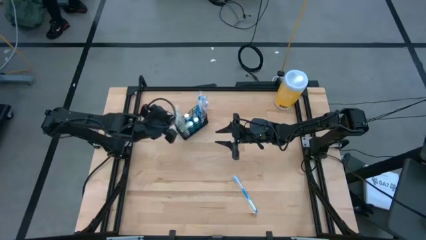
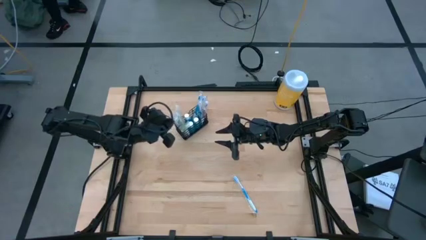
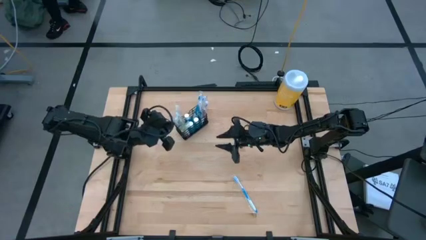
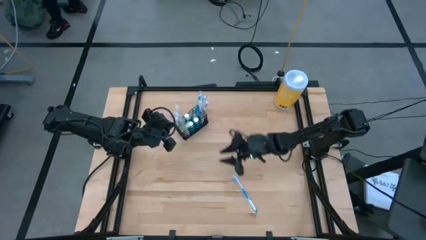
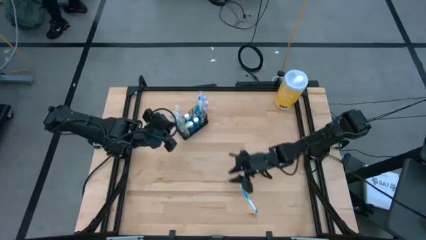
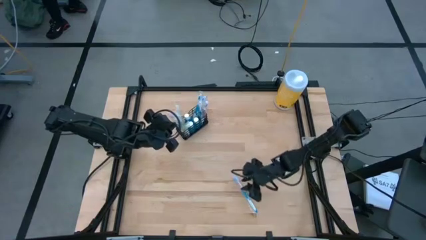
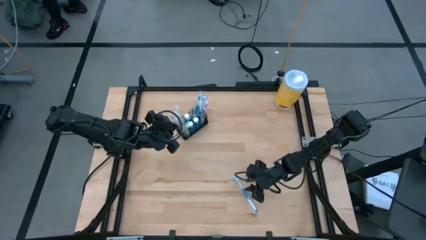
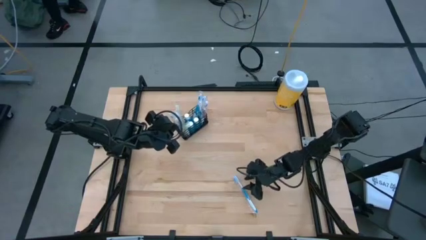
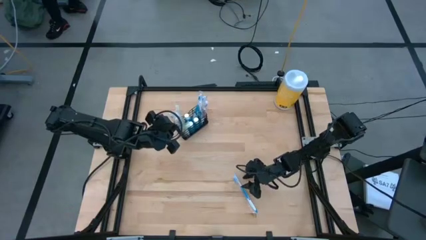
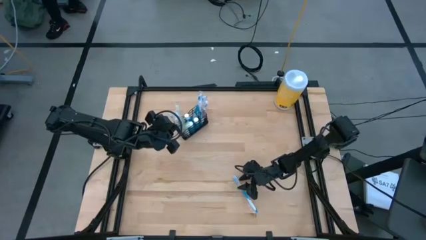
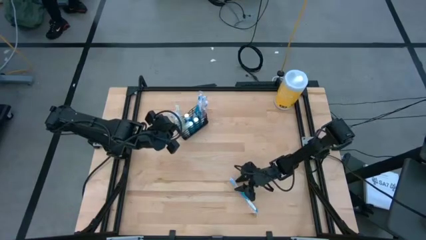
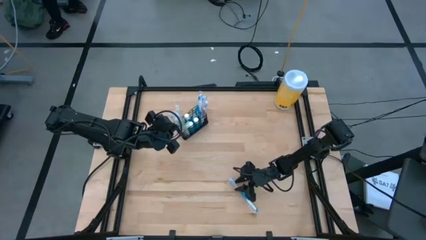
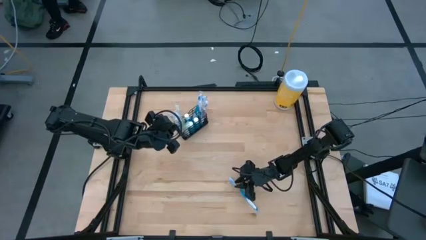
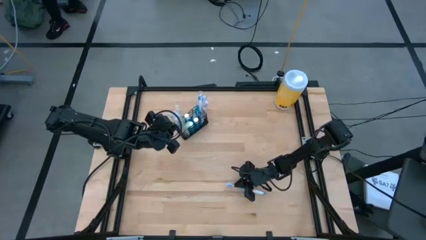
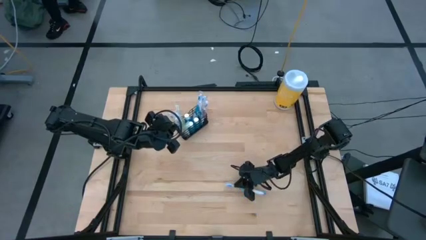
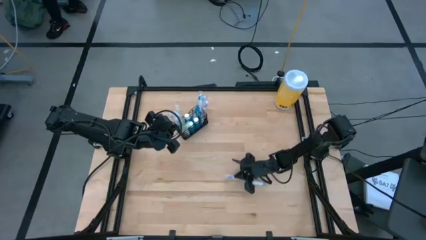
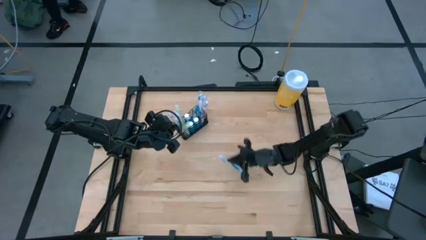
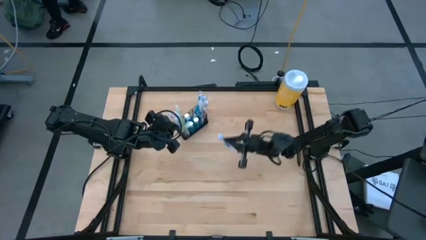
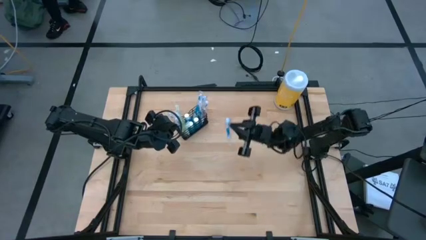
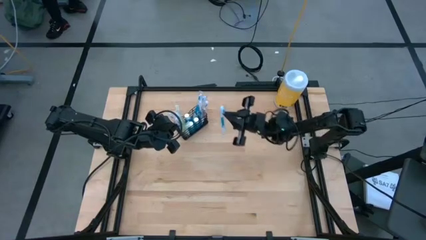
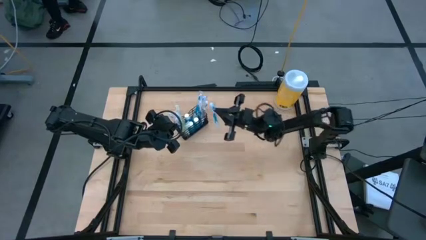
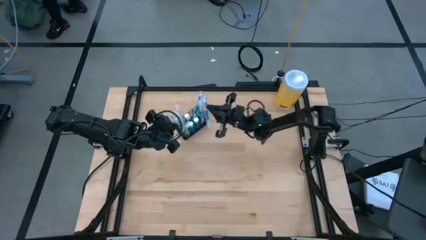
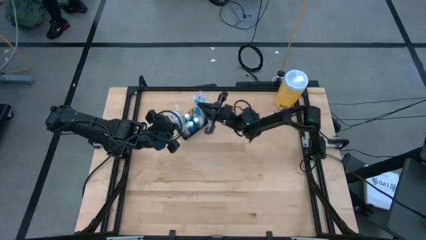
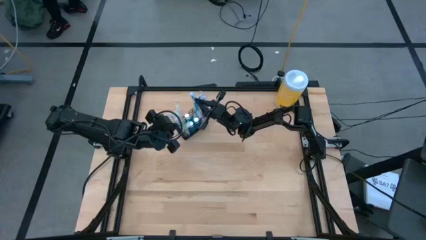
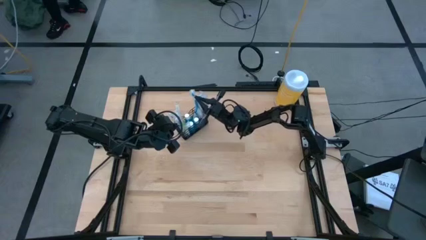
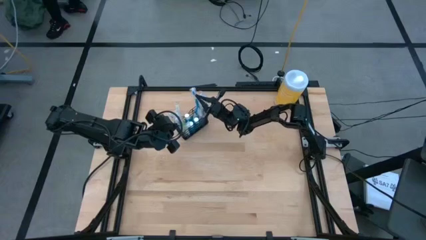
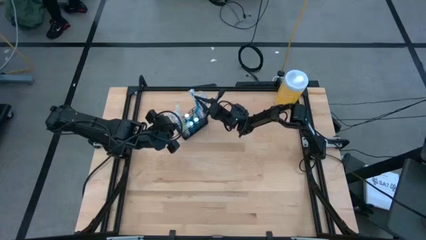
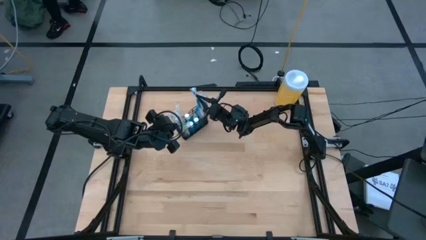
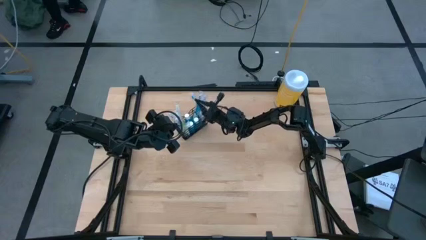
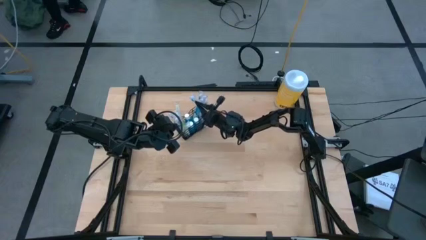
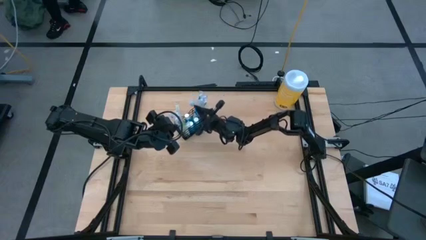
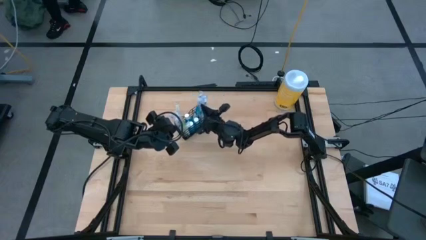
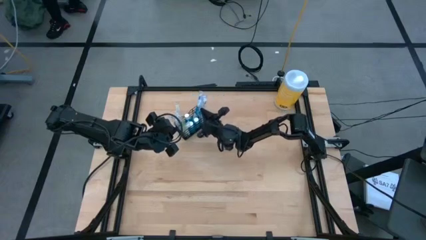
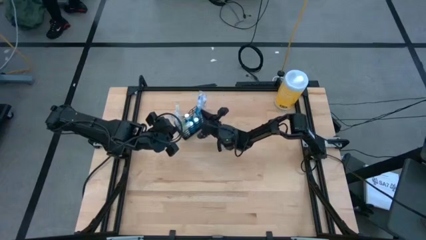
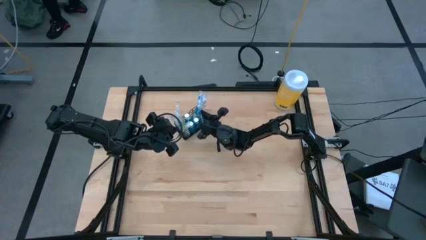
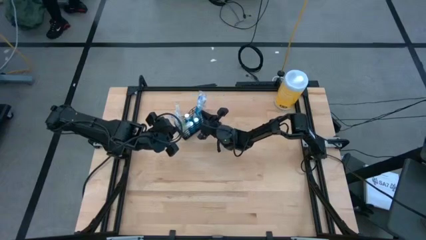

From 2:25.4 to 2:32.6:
Task: Pick & Place toothbrushing station
Put the blue toothbrush into the black wire organizer

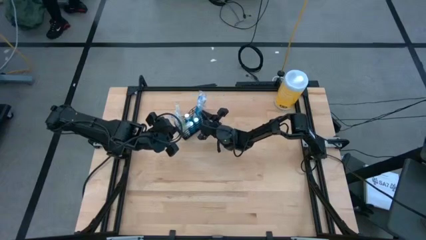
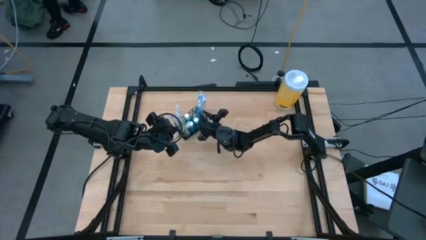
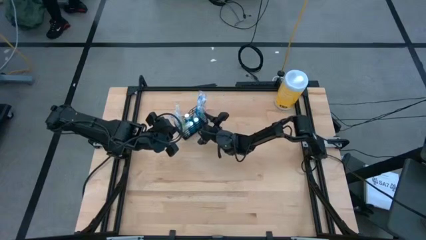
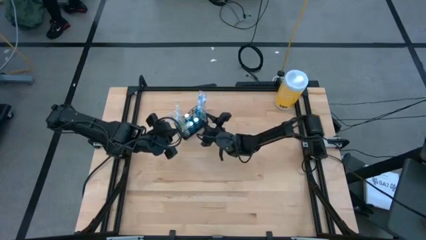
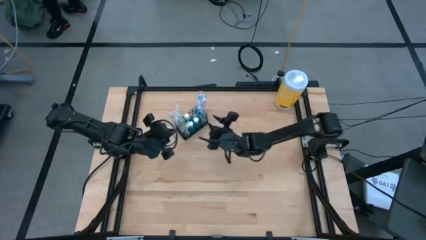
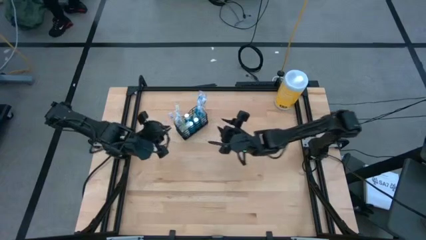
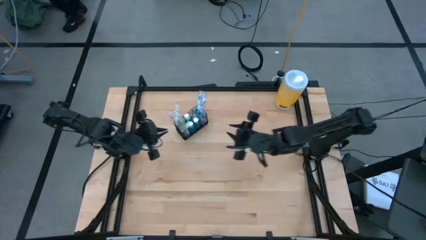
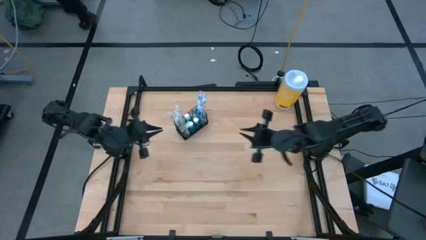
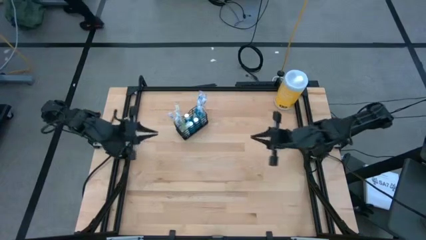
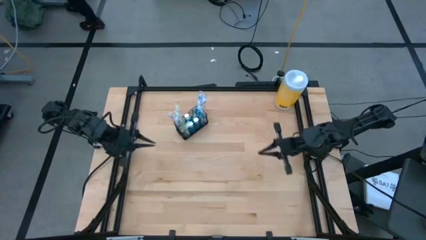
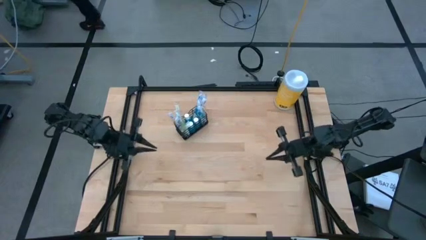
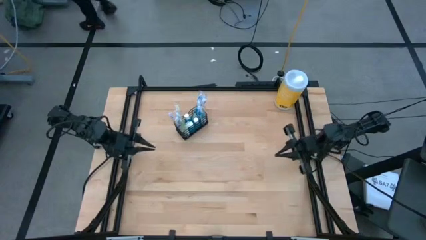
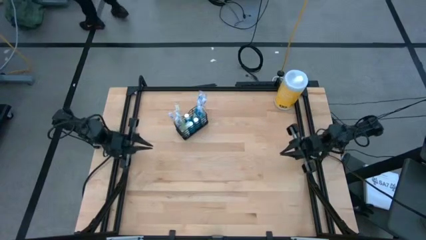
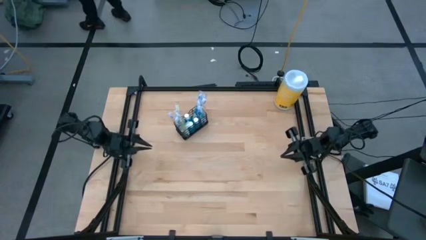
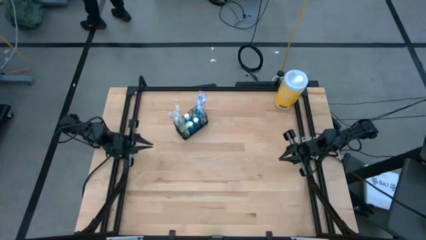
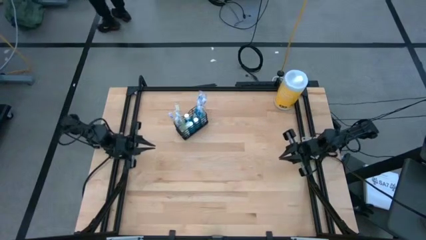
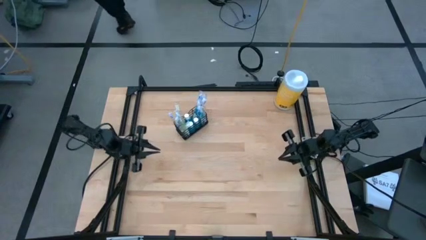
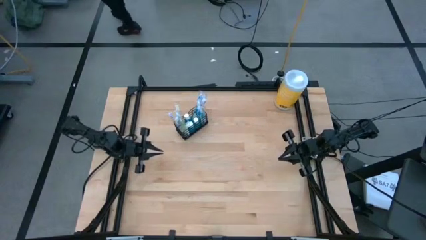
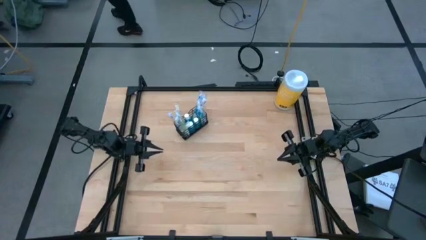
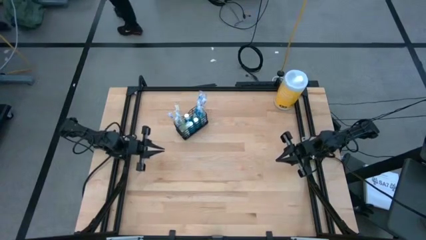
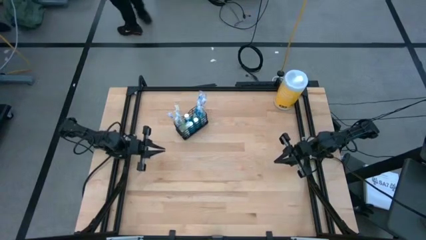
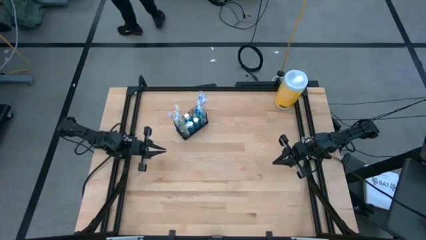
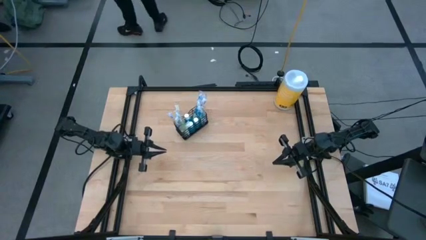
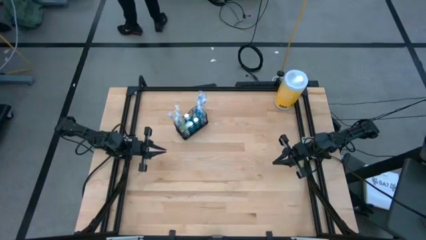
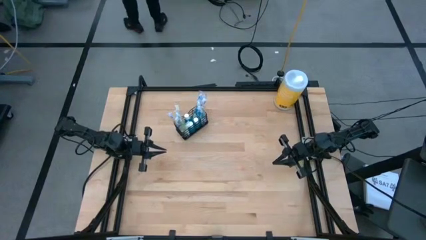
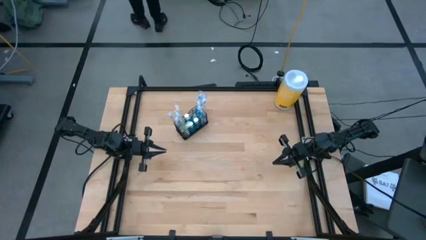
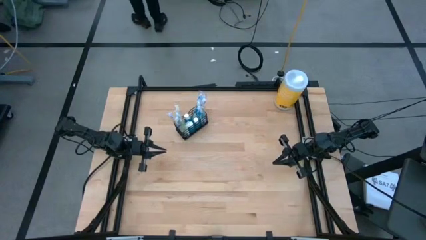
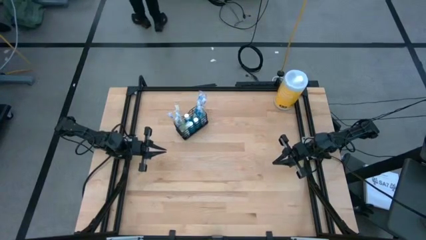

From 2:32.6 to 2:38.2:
Return to Home Position
